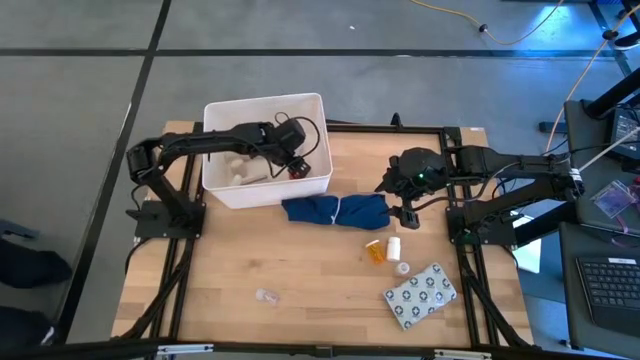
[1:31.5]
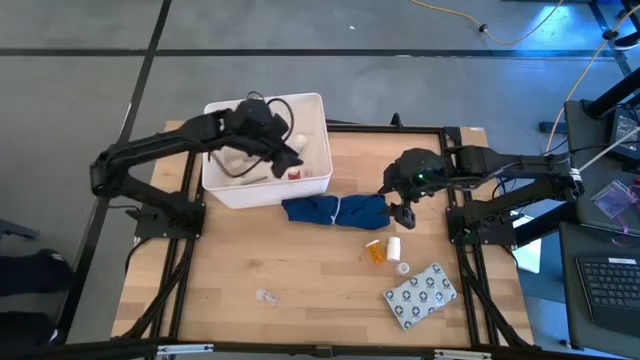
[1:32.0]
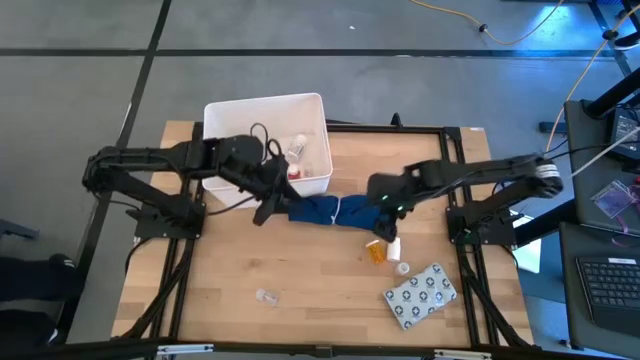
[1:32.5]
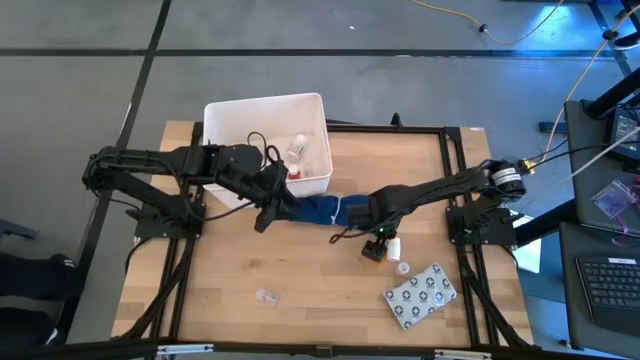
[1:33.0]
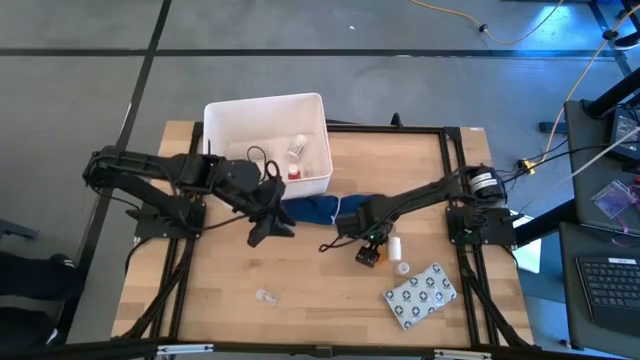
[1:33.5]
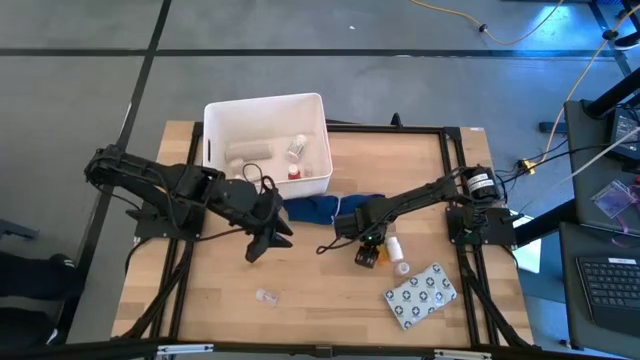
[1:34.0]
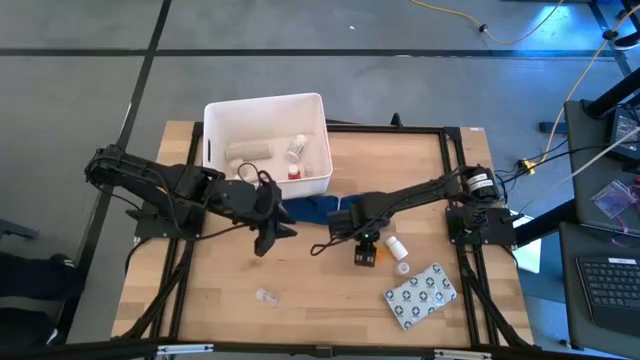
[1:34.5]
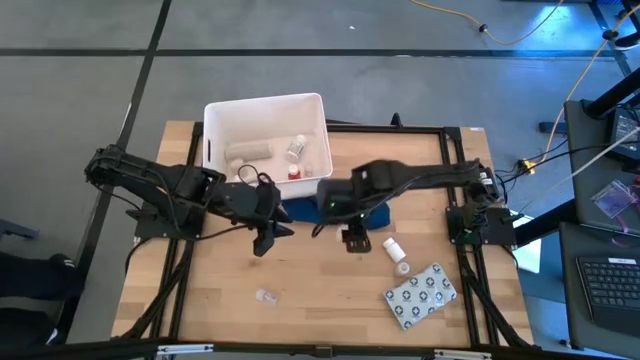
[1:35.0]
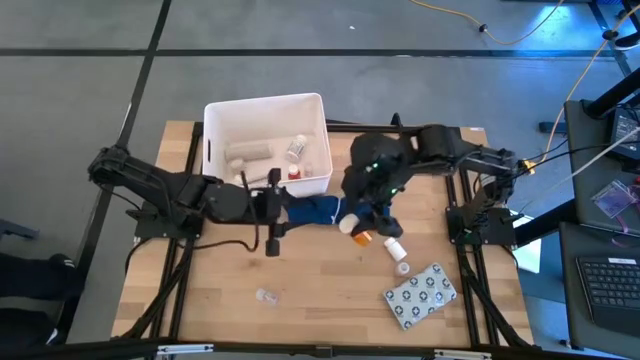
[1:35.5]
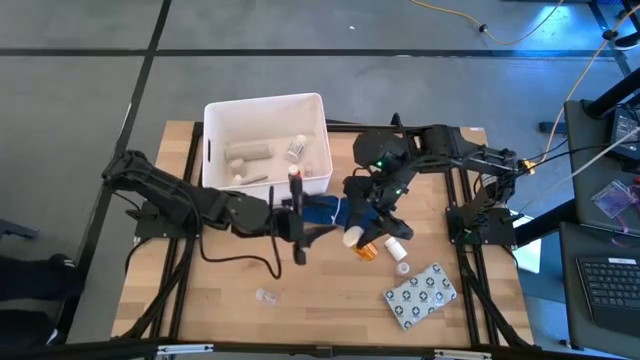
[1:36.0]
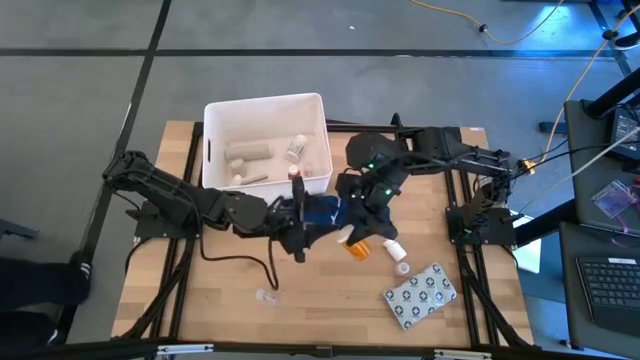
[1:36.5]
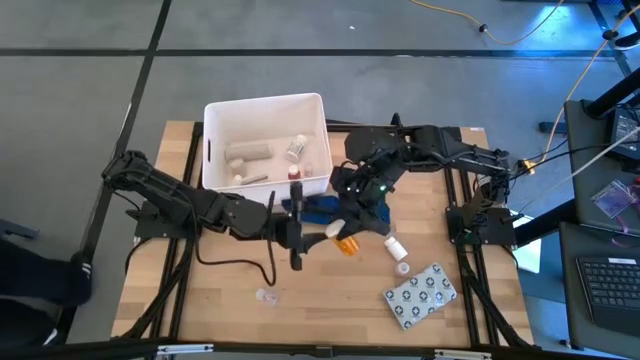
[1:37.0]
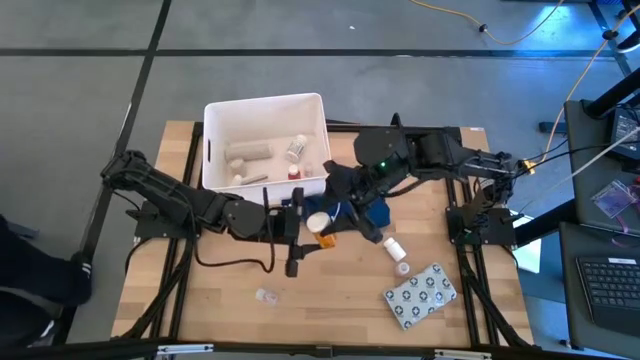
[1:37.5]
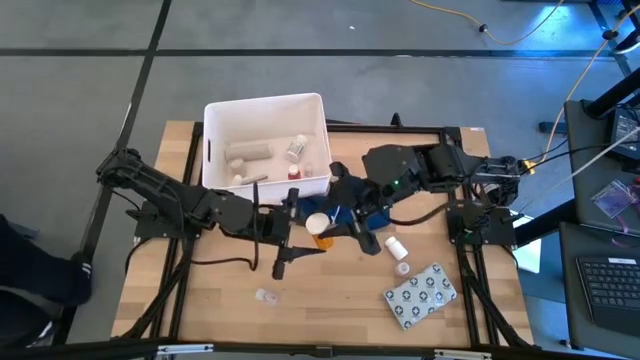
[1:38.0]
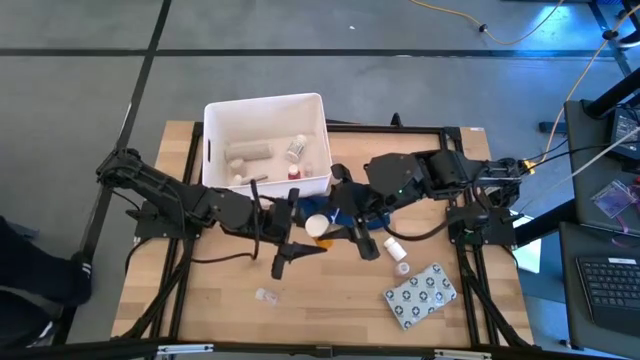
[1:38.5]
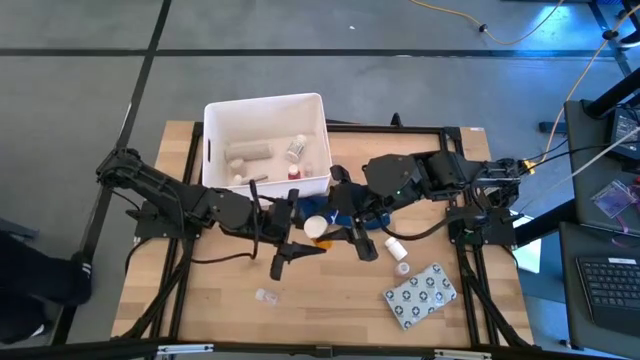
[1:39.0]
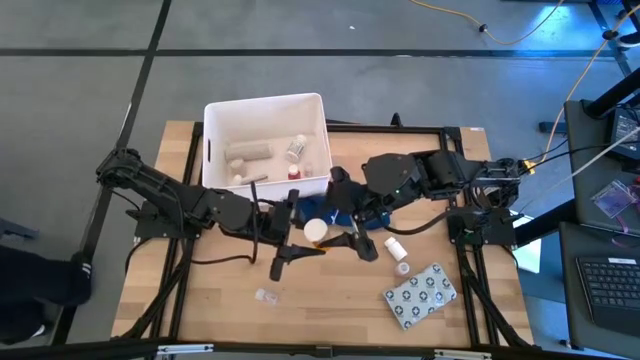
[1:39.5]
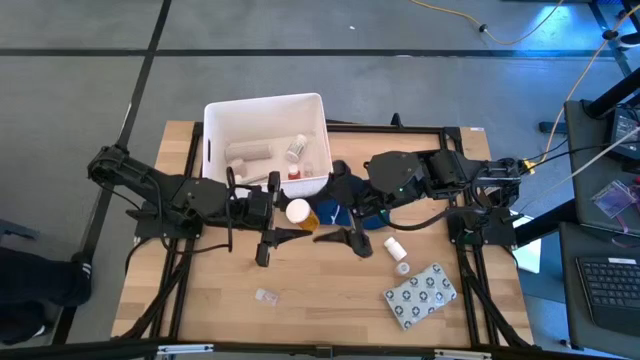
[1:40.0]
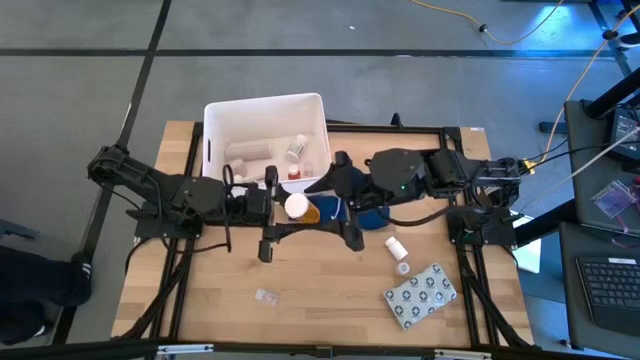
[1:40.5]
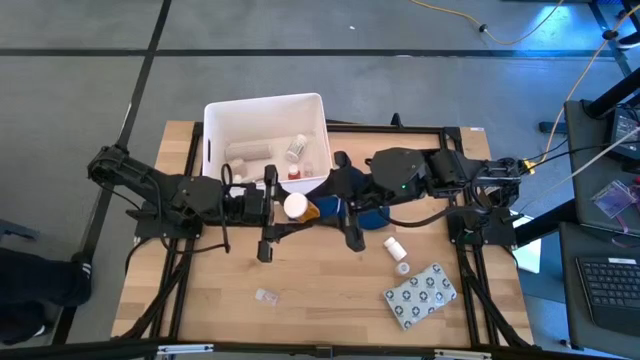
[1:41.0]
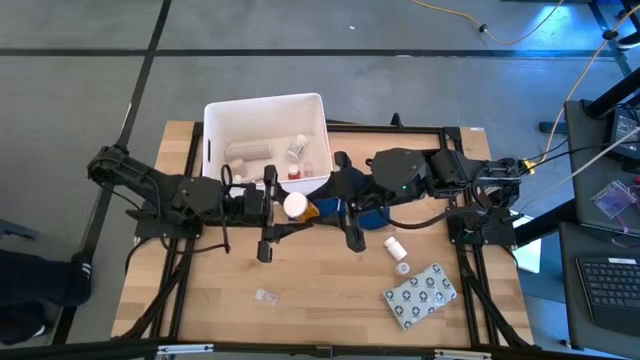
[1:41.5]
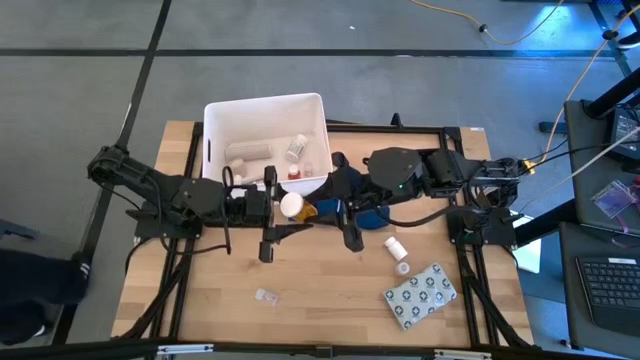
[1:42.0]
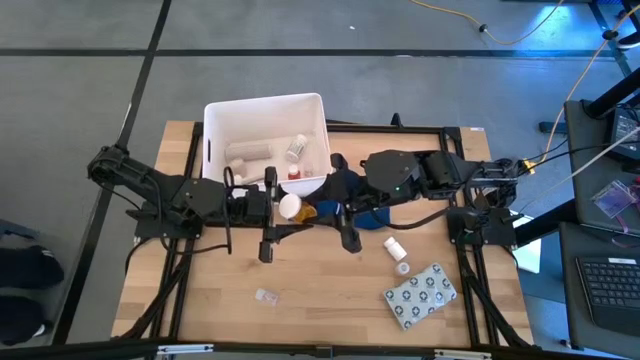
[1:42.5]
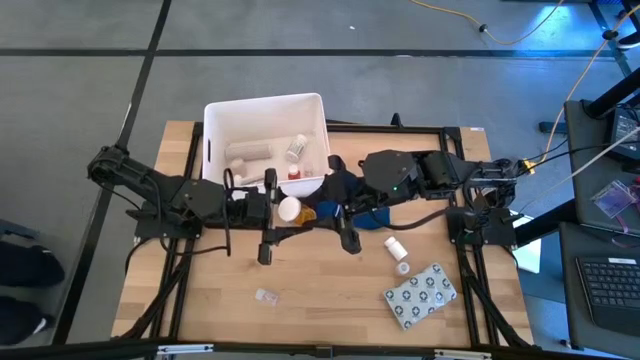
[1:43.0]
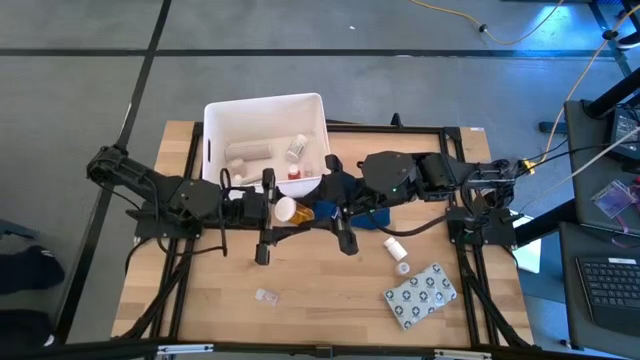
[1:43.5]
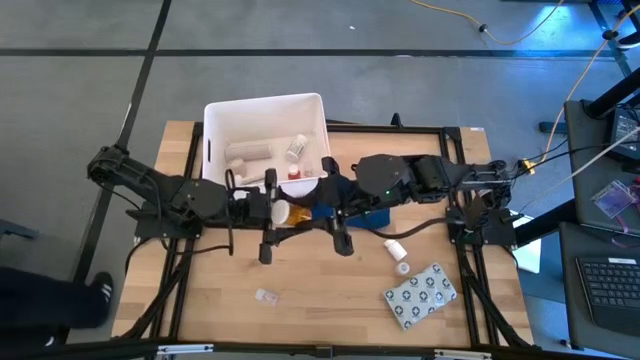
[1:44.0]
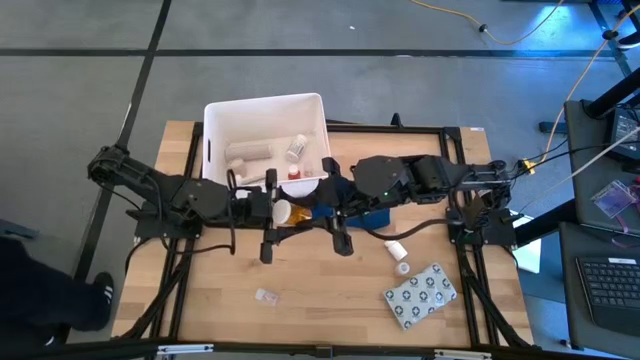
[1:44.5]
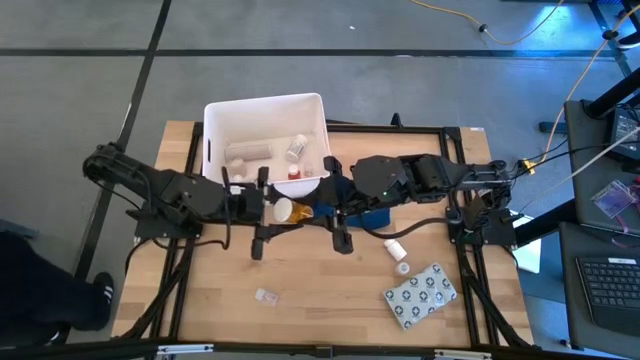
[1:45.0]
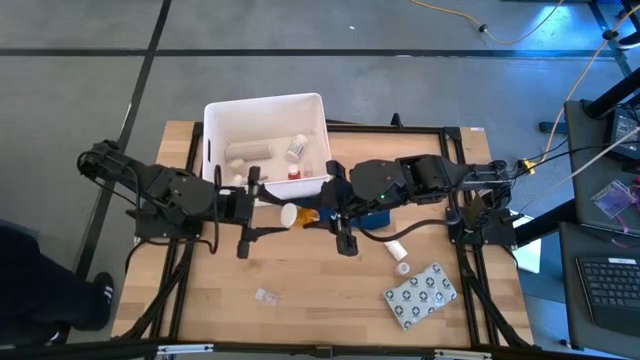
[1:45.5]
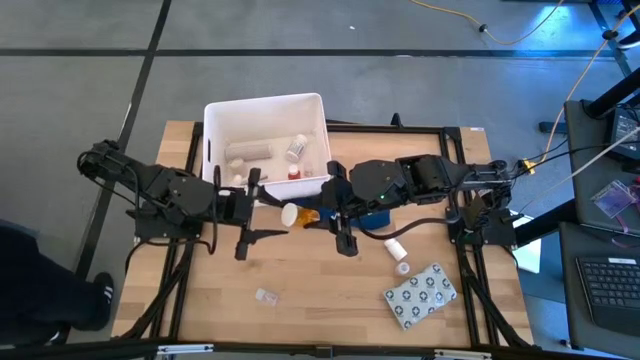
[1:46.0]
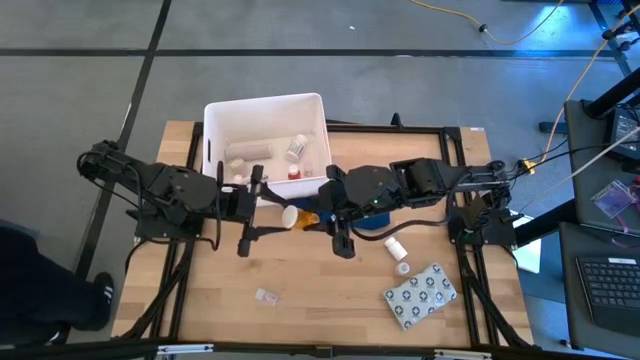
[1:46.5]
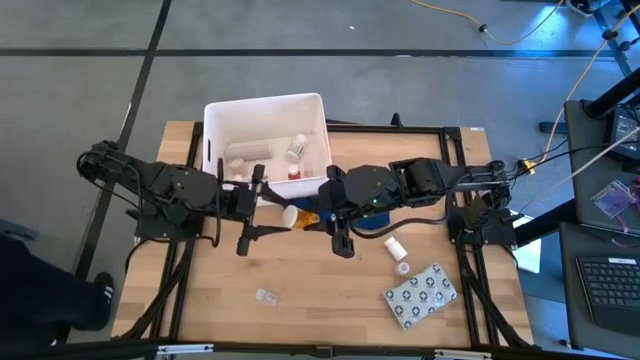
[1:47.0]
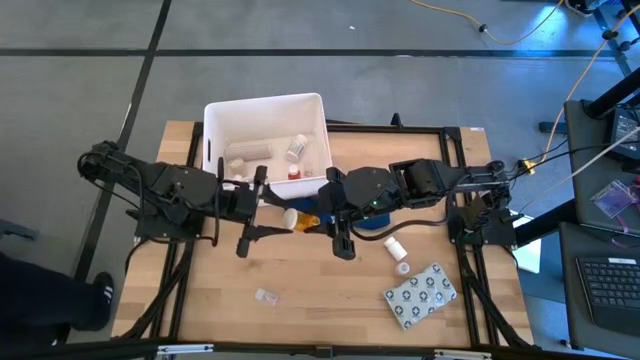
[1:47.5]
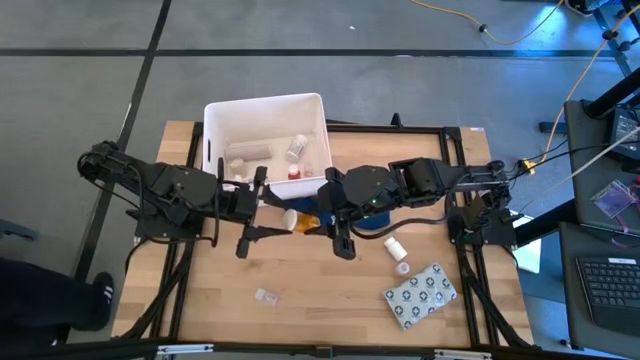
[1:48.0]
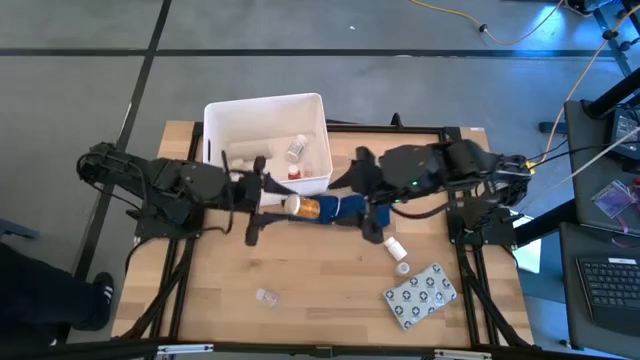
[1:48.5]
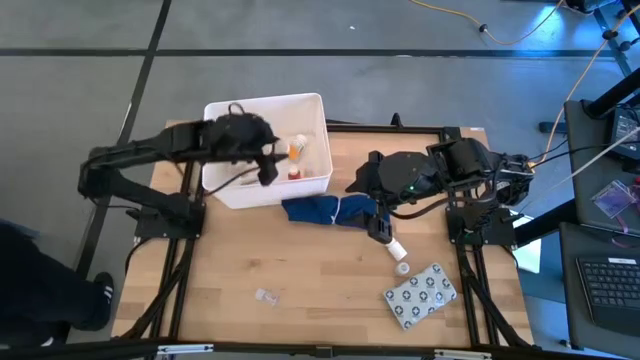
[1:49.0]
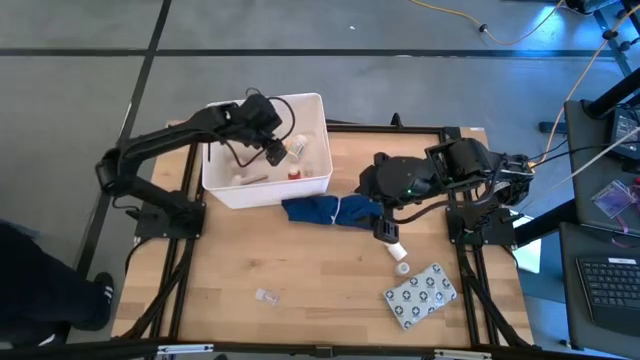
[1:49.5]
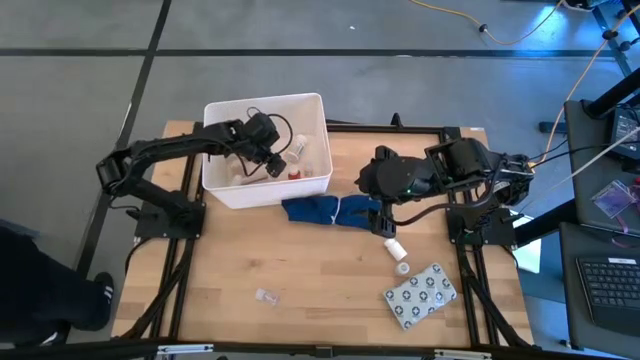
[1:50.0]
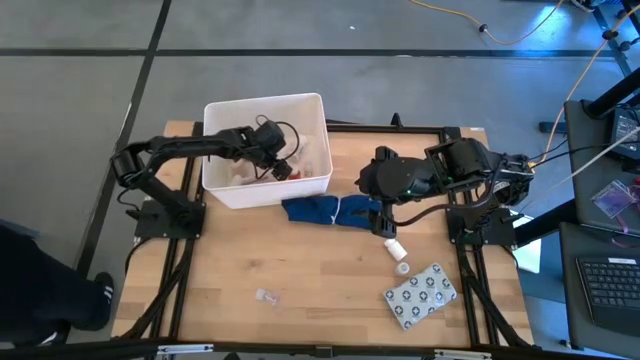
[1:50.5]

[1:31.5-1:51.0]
Task: Pick & place medical supplies in basket/bin
Put the orange pill bottle into the white container

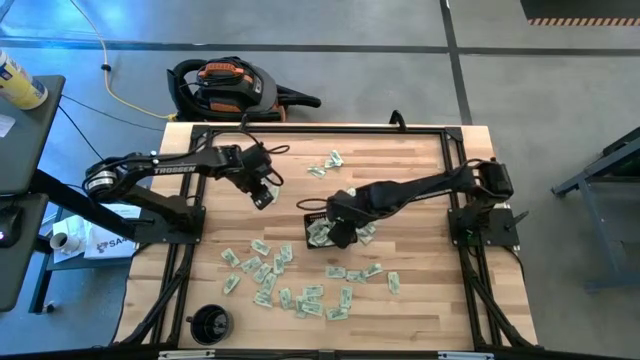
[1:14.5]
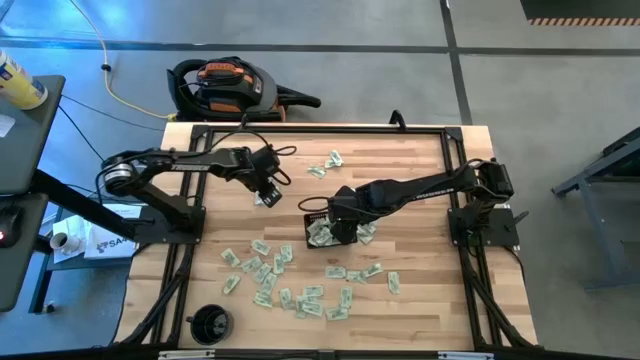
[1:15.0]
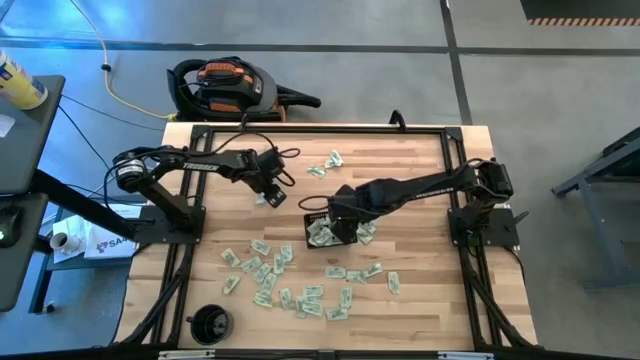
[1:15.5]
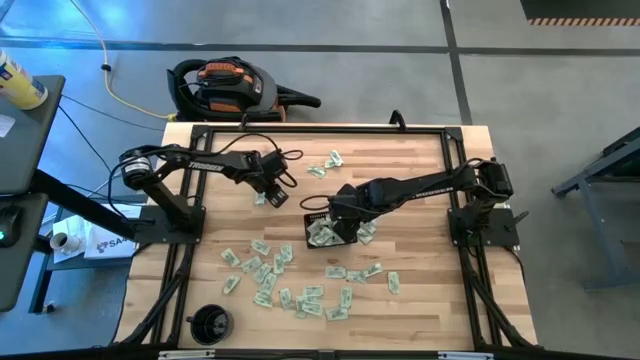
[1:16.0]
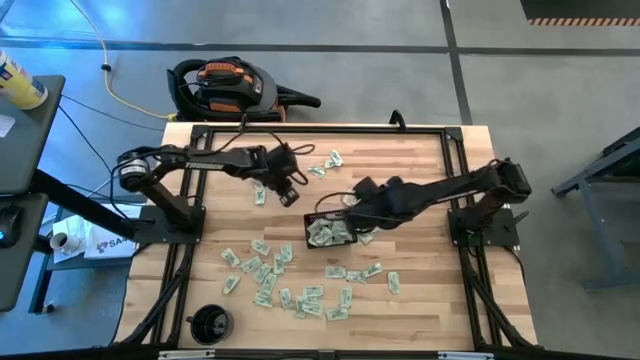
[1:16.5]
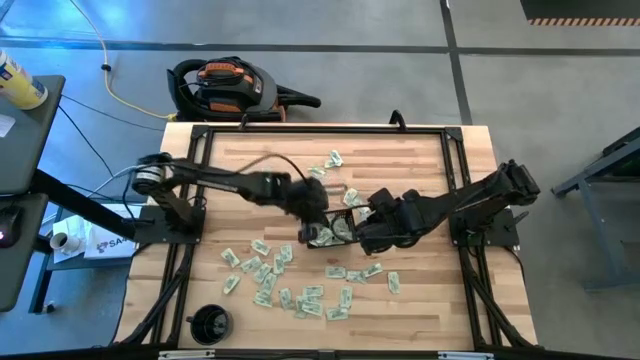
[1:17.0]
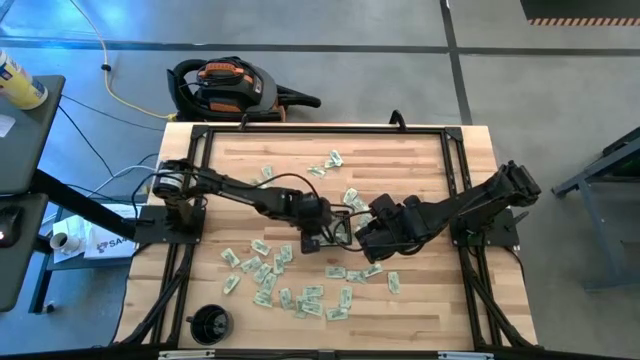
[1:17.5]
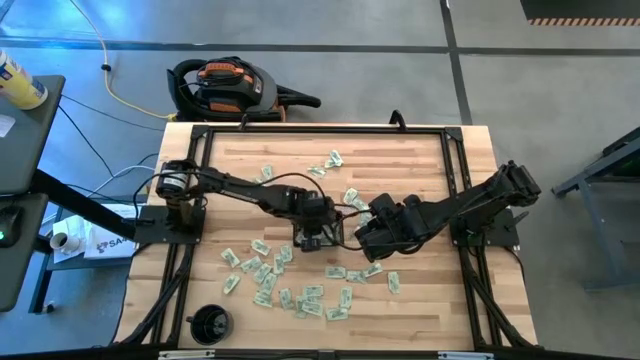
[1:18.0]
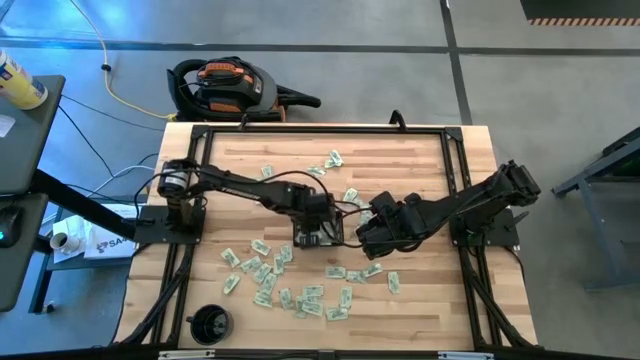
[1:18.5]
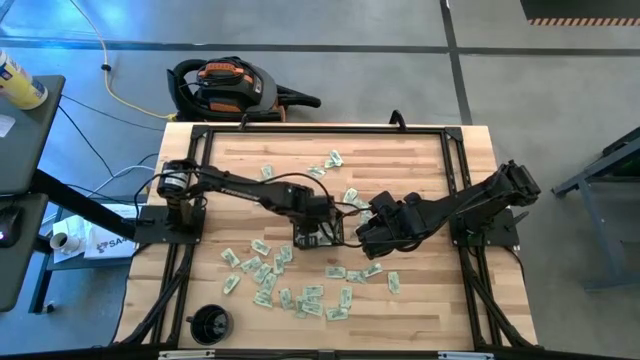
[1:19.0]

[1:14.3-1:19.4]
Task: Pick and place Stevia / Truvia into bins
Put the green stevia packet into the black basket
